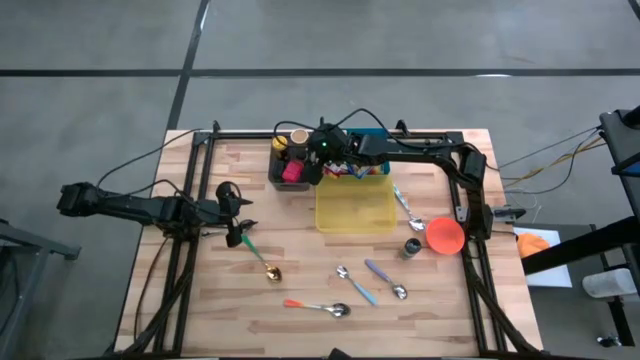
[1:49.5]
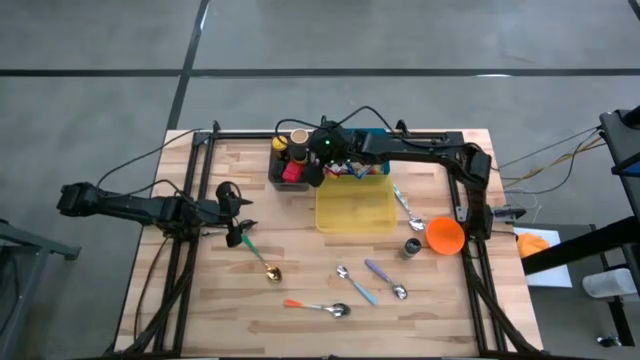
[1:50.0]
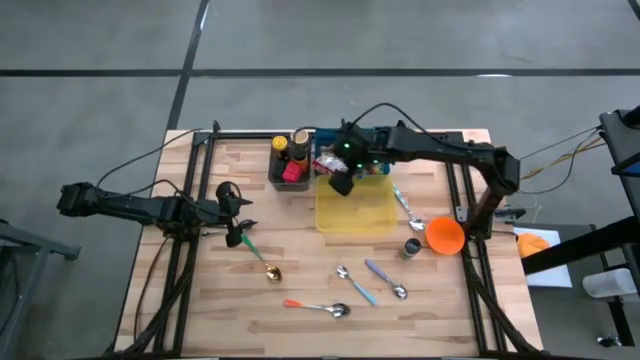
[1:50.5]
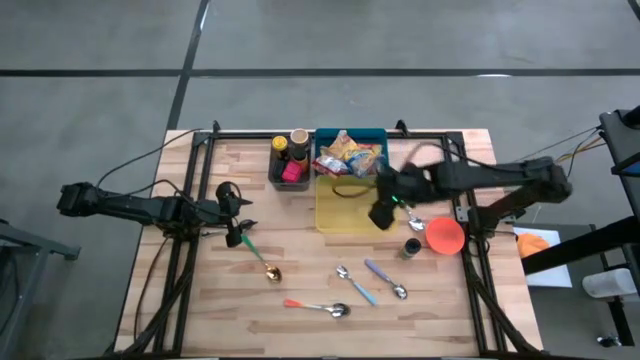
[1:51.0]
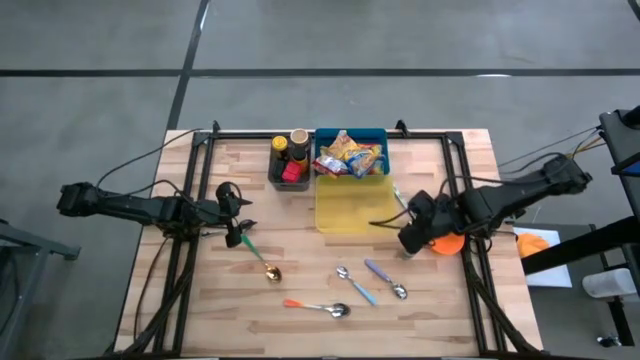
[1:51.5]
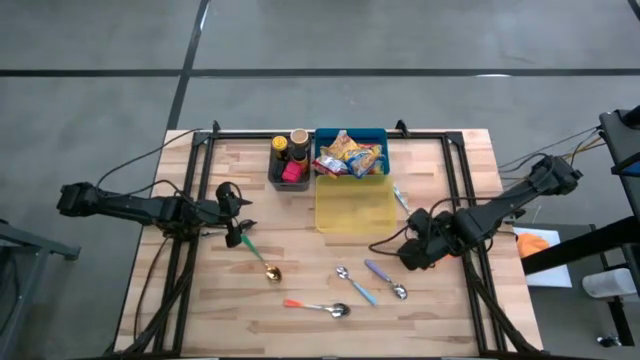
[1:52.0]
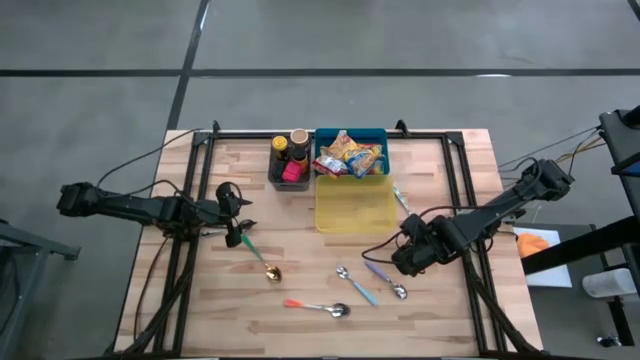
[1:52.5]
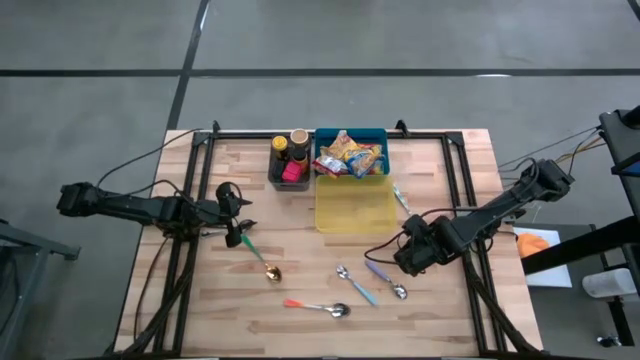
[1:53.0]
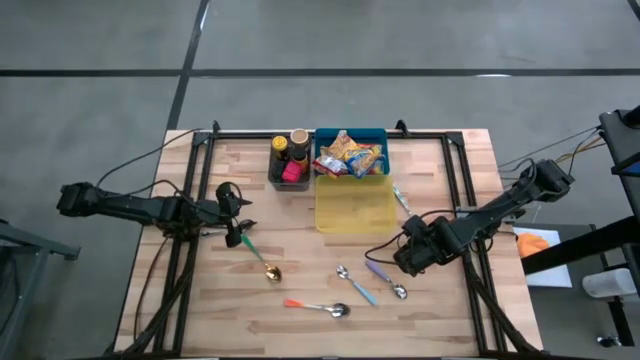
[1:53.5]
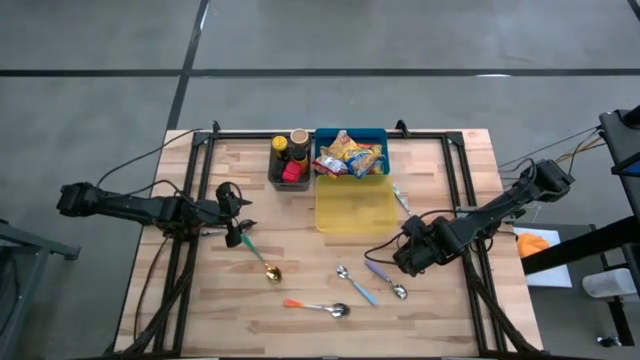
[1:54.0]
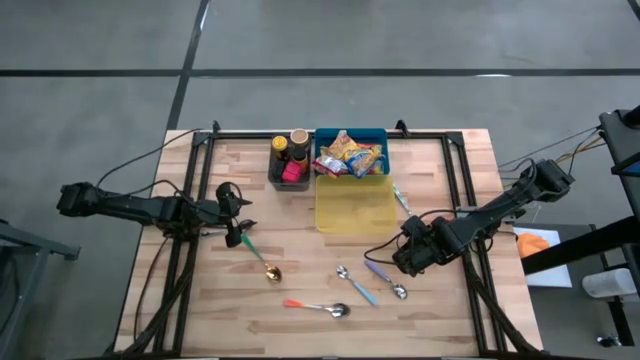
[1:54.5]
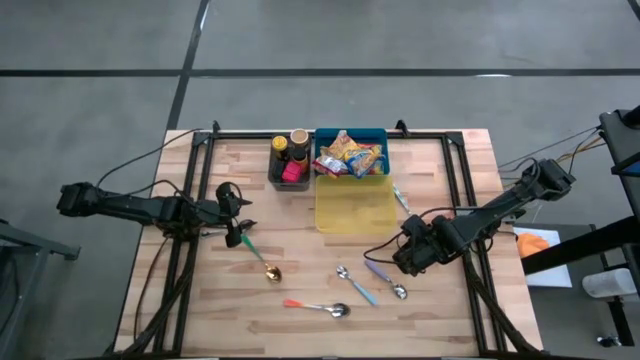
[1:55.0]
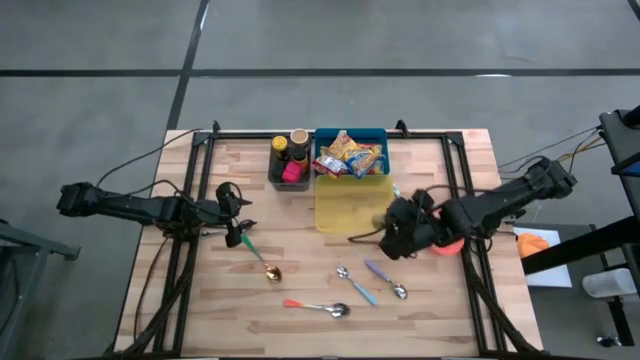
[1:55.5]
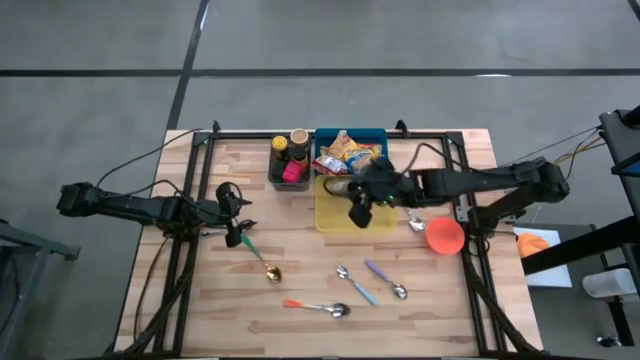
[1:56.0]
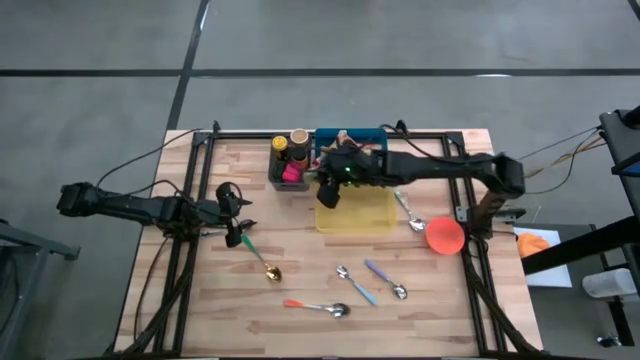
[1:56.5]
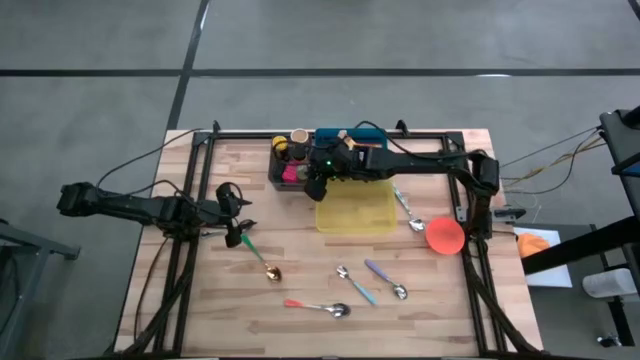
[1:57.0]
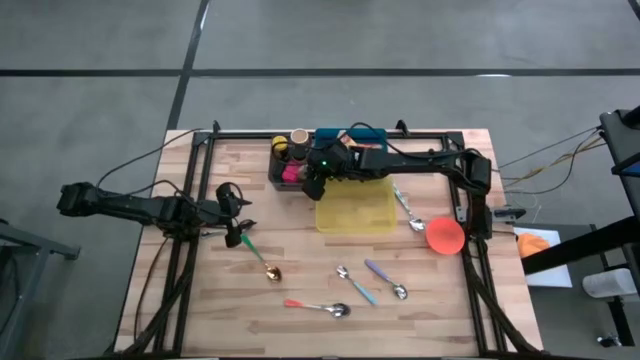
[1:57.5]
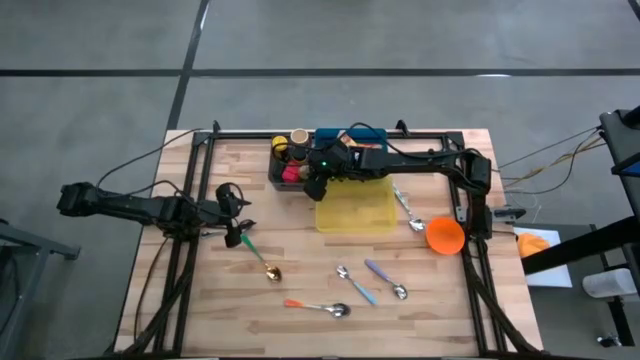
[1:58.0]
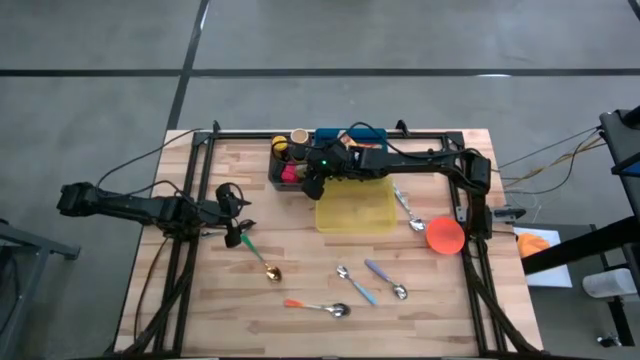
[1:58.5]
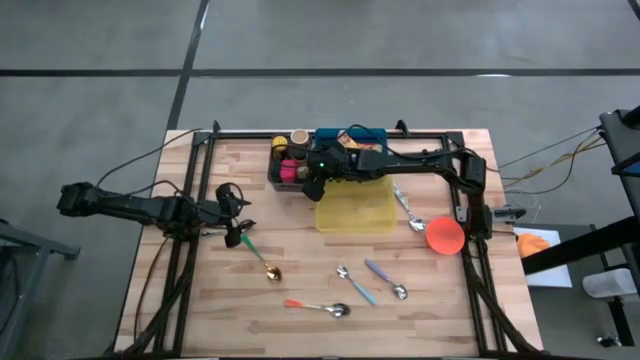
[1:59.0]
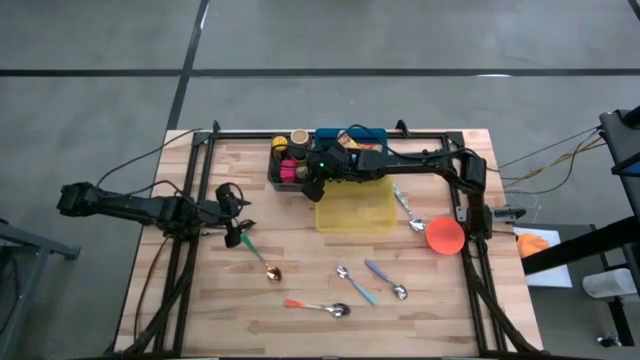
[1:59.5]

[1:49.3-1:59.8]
Put the black spice bottle into the black bin

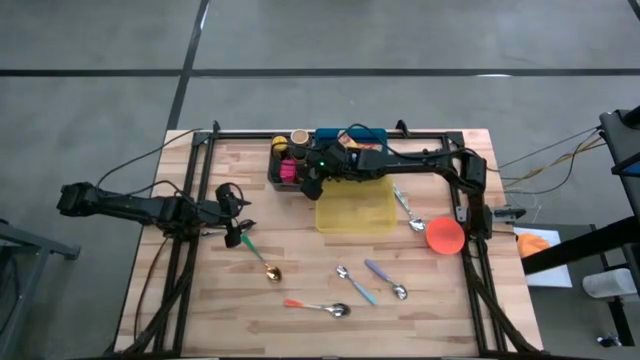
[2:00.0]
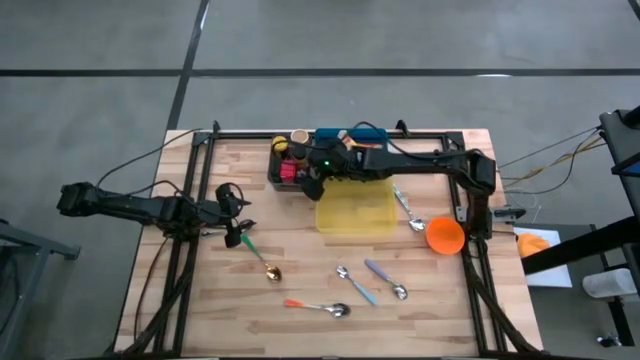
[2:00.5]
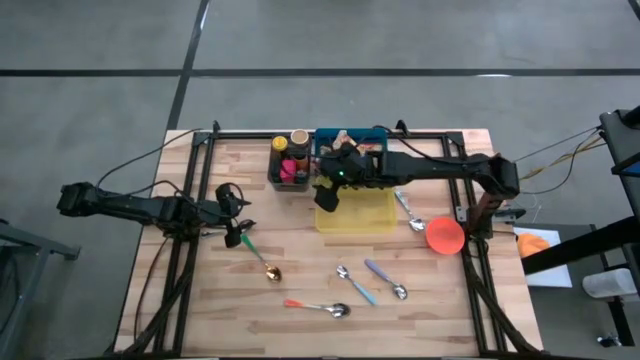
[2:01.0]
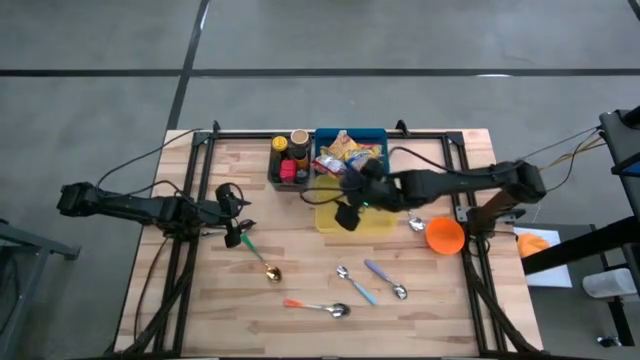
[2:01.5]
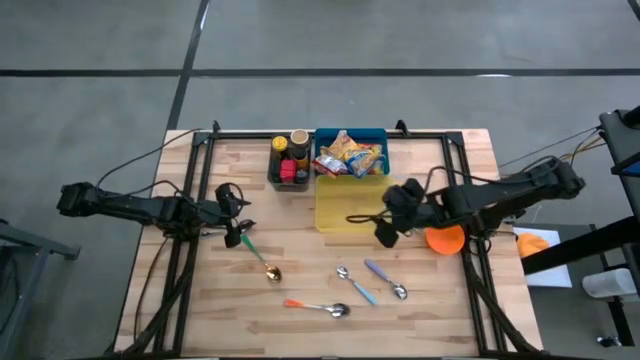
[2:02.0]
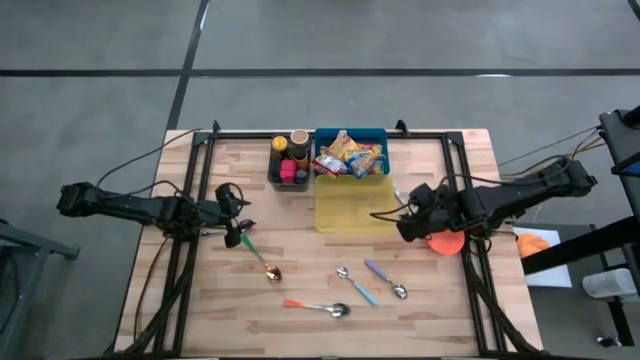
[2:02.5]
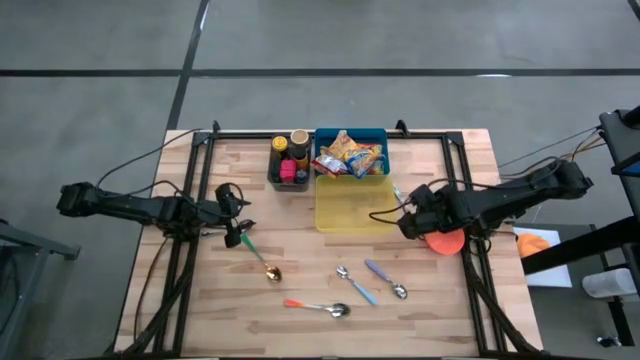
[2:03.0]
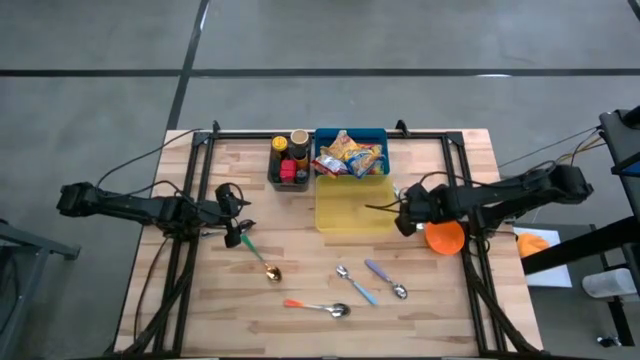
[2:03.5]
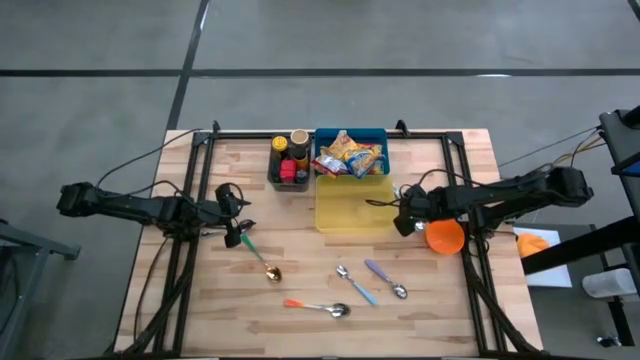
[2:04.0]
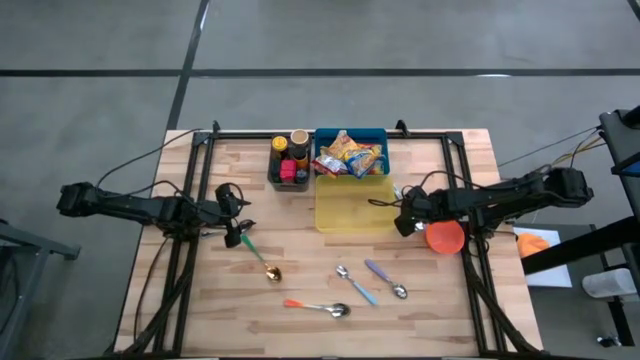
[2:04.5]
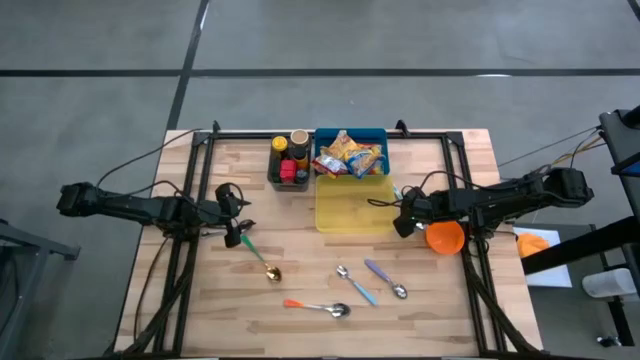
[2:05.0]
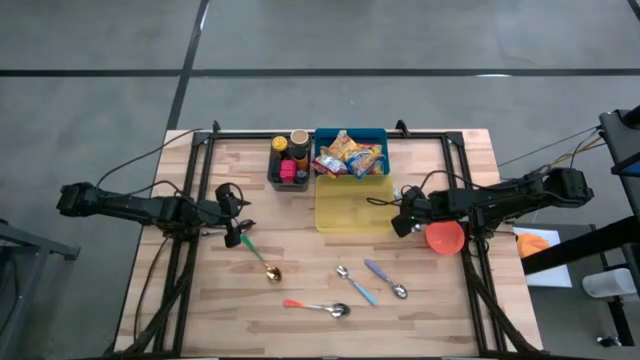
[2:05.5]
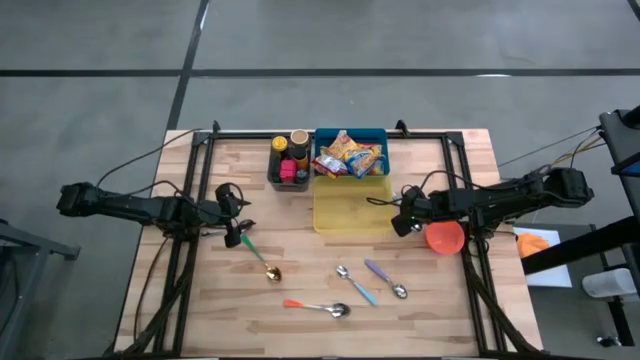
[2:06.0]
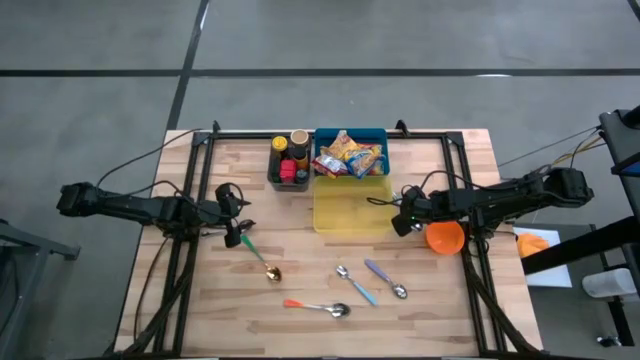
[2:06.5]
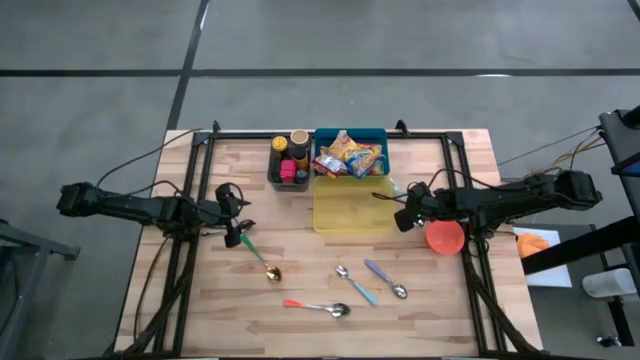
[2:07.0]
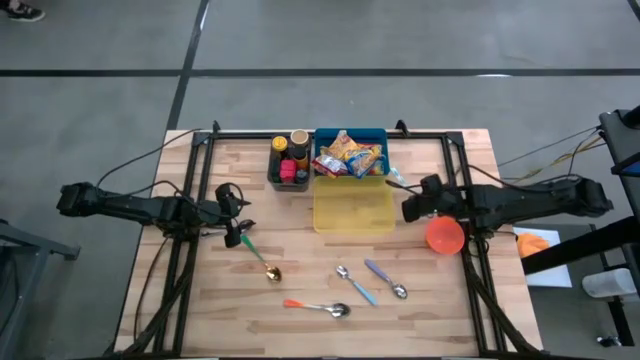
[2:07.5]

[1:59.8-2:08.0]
Put the green patterned spoon into the yellow bin
